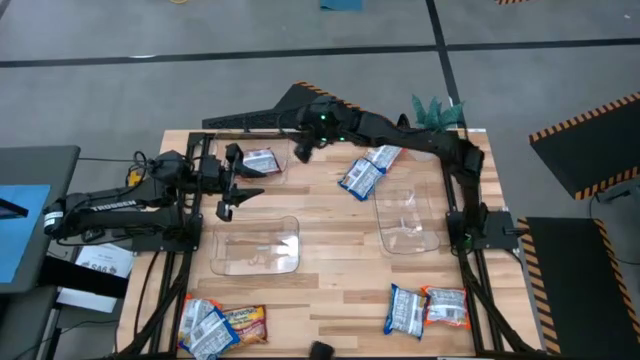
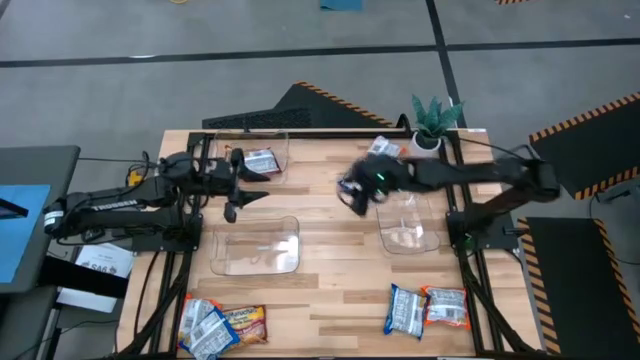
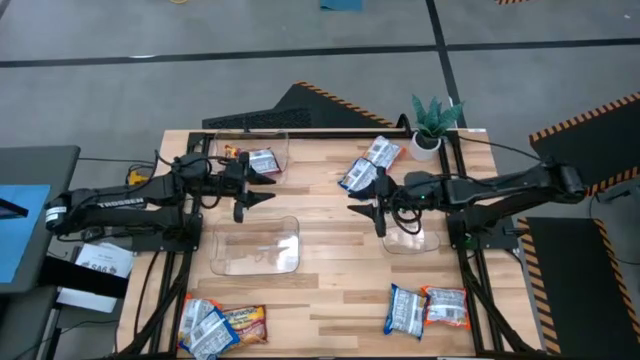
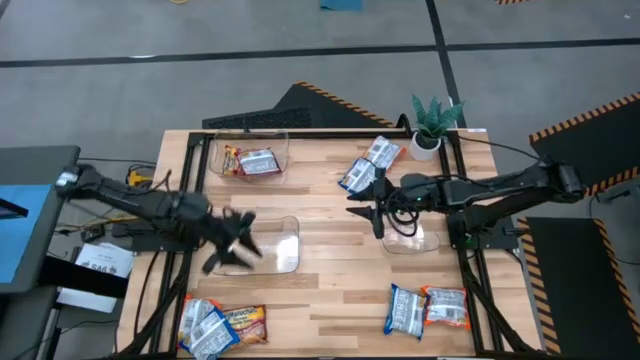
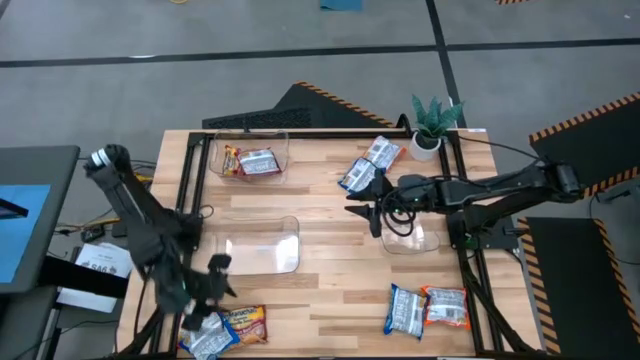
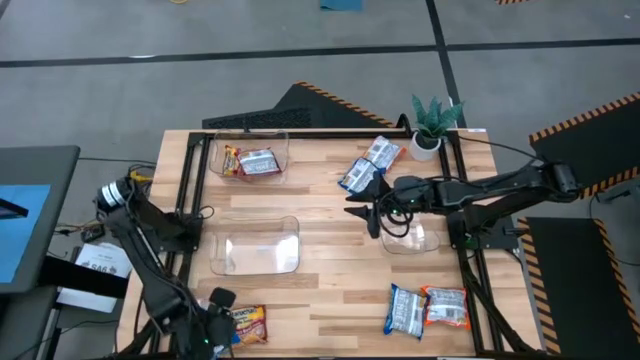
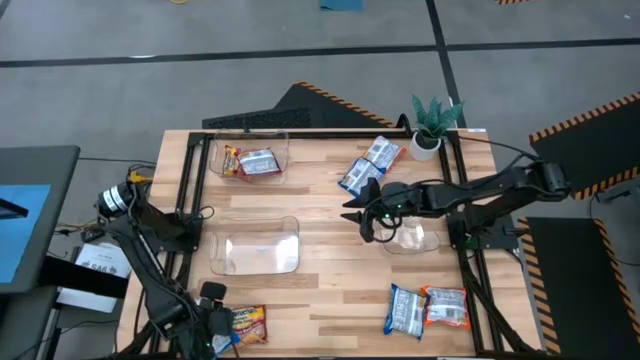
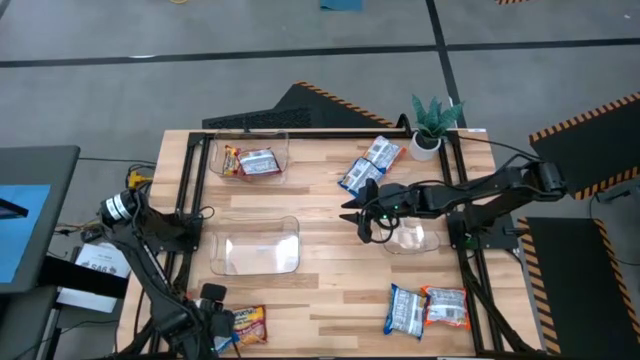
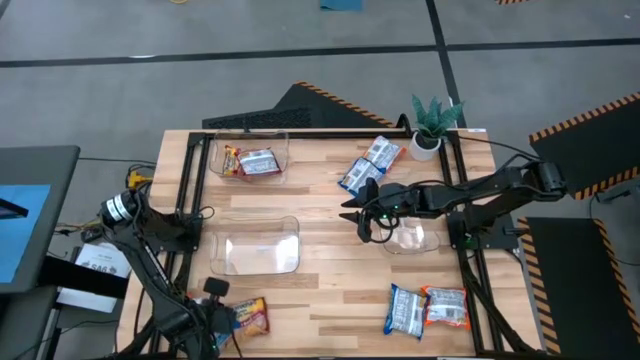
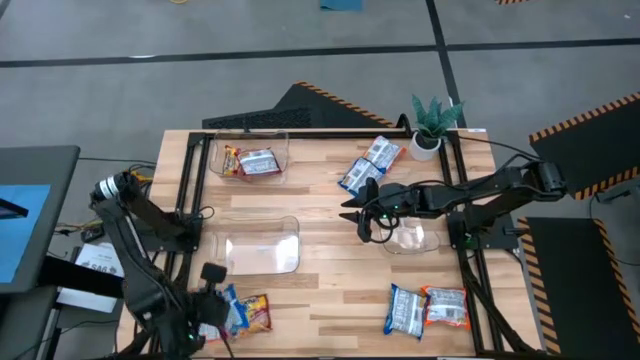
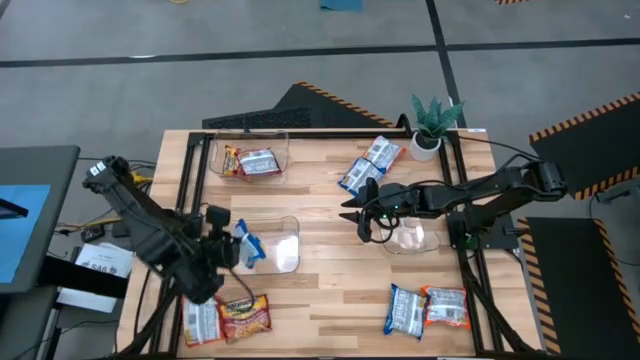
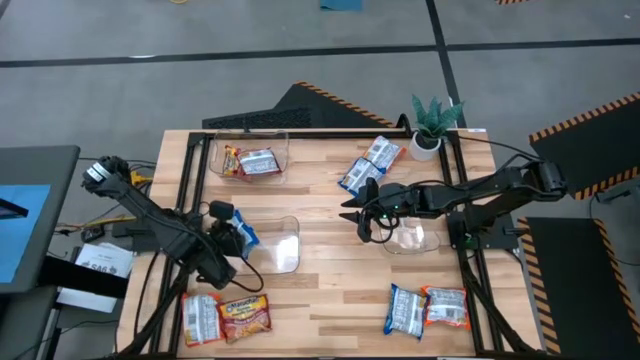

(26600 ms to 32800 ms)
Task: Sort Maruchan noodles
Put the bottom left blue noodle pack into the bottom left transparent bin

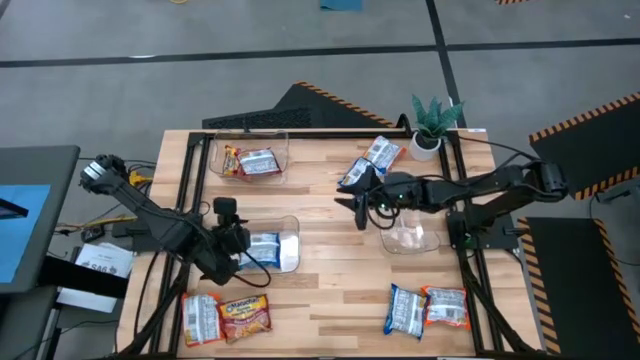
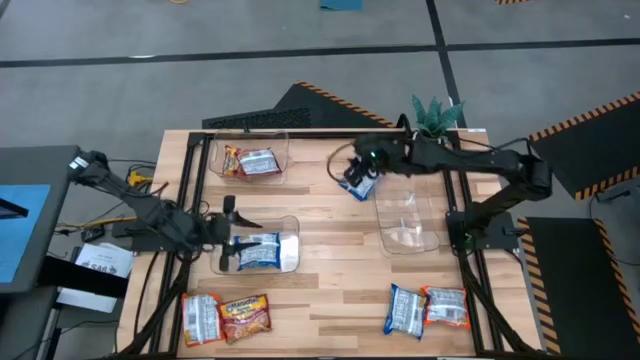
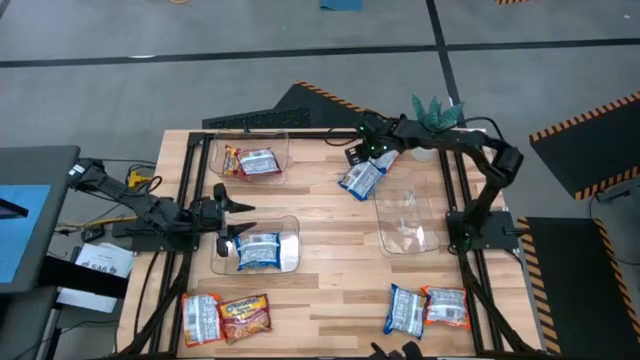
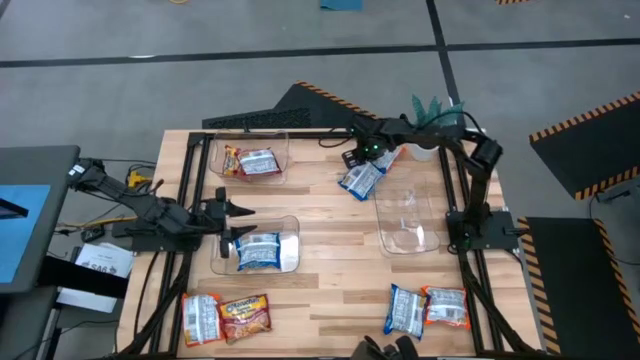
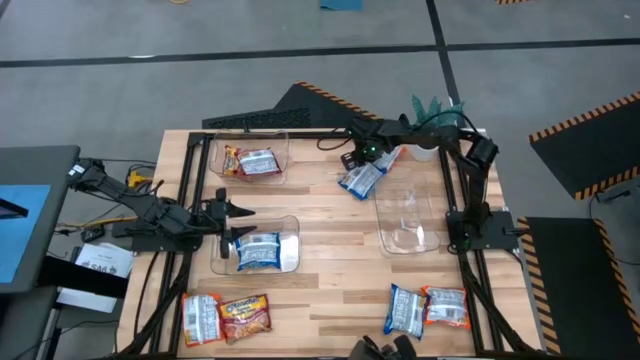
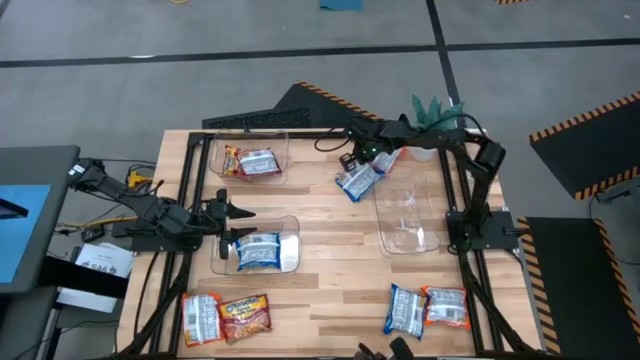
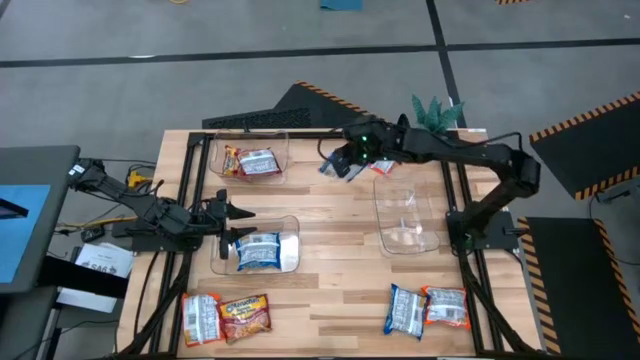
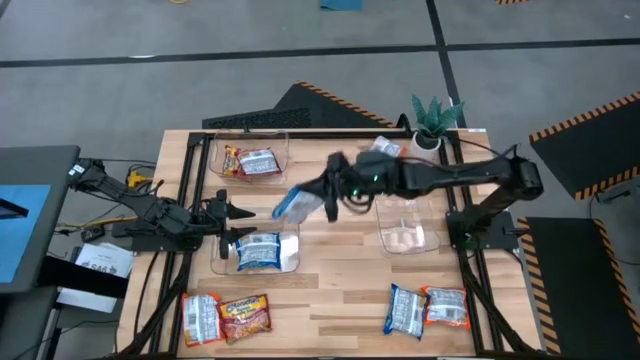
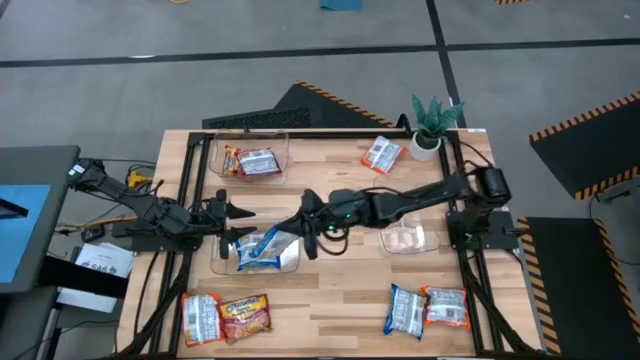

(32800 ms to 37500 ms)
Put the top blue noodle pack into the bottom left transparent bin

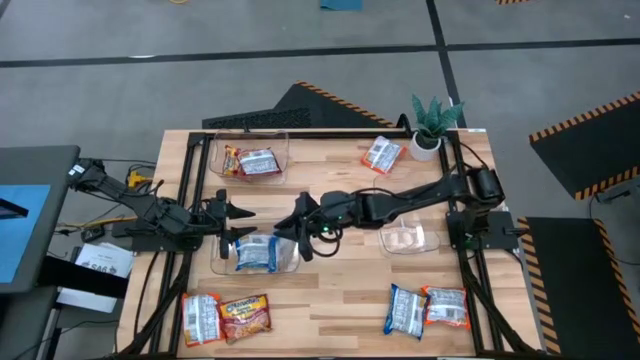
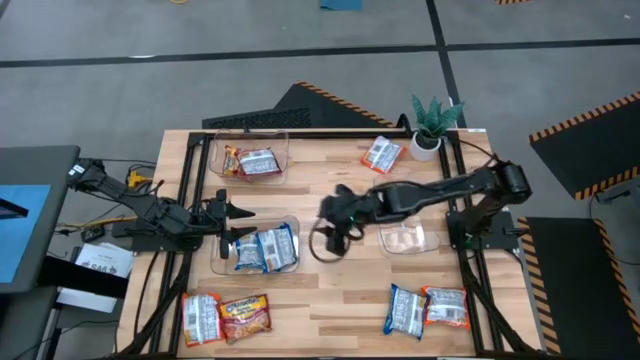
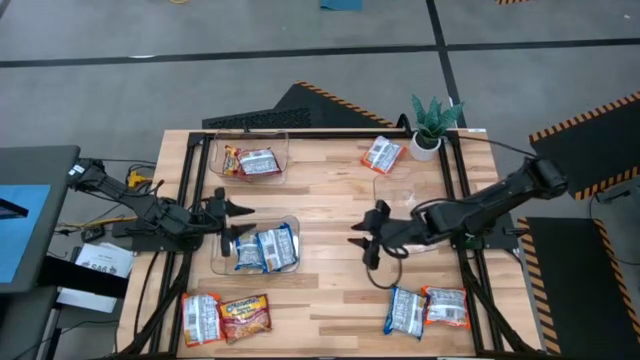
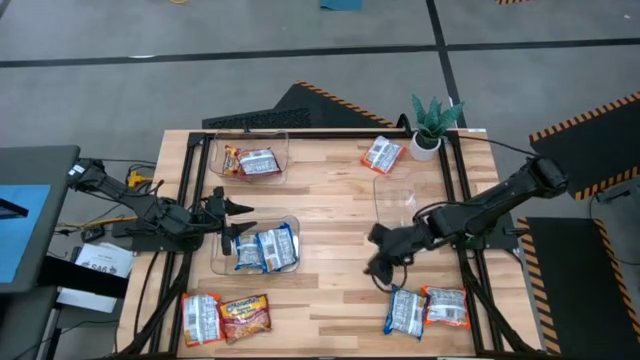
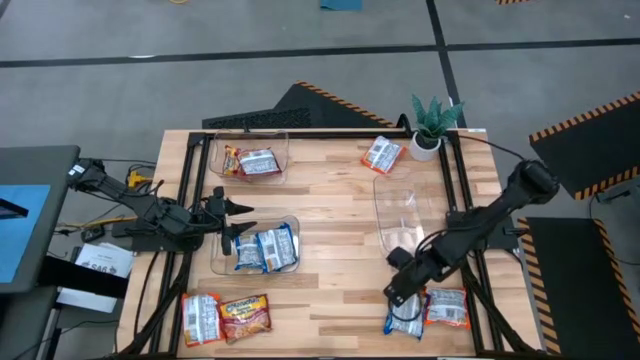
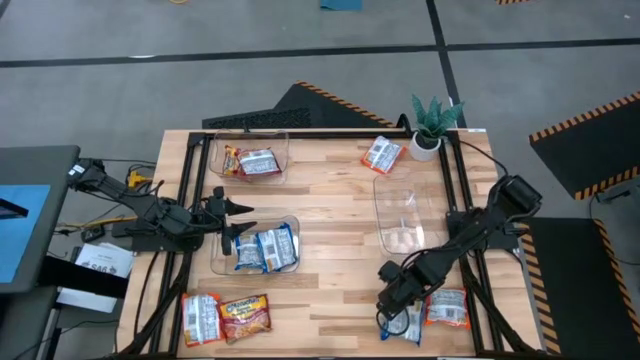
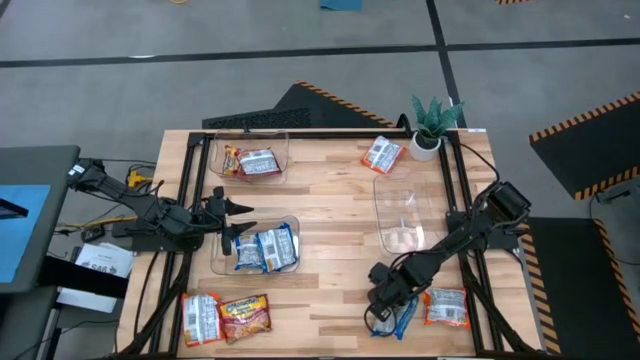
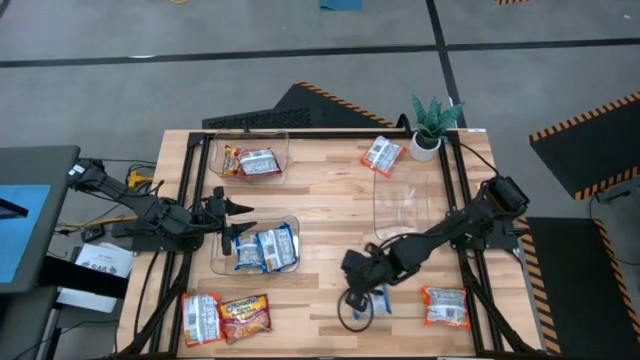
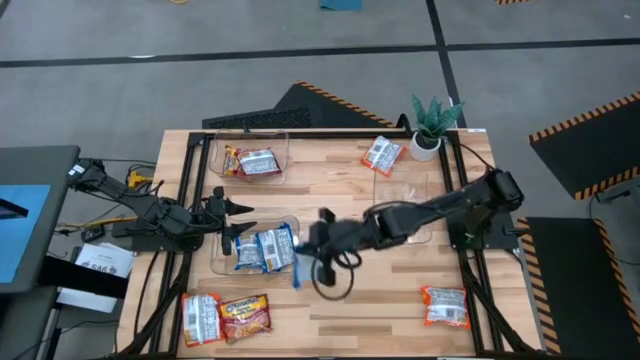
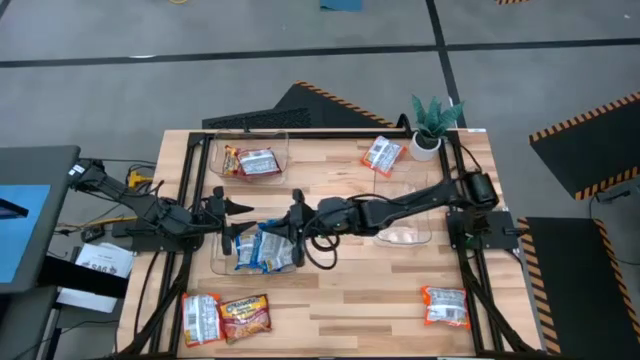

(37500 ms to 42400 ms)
Put the blue noodle pack into the bottom left transparent bin

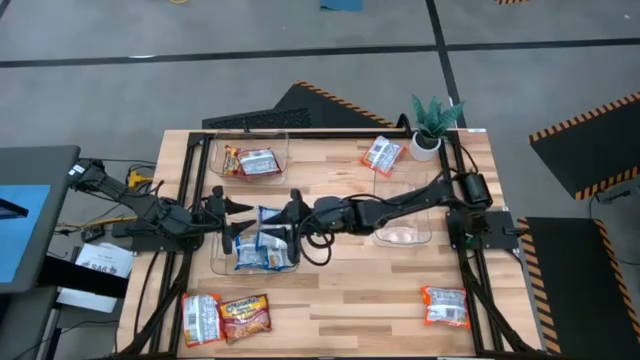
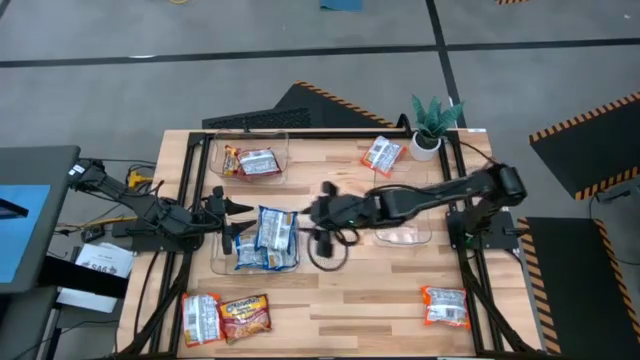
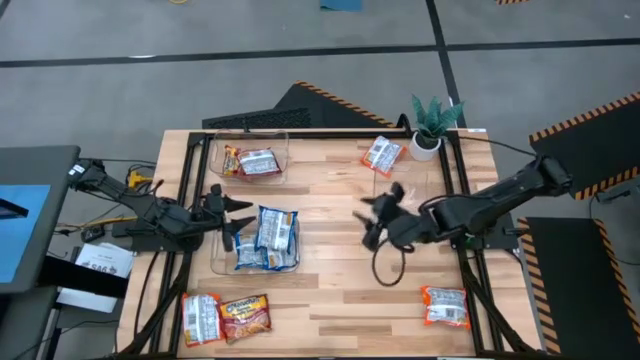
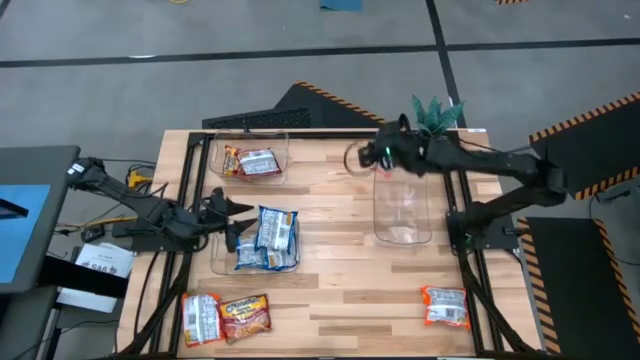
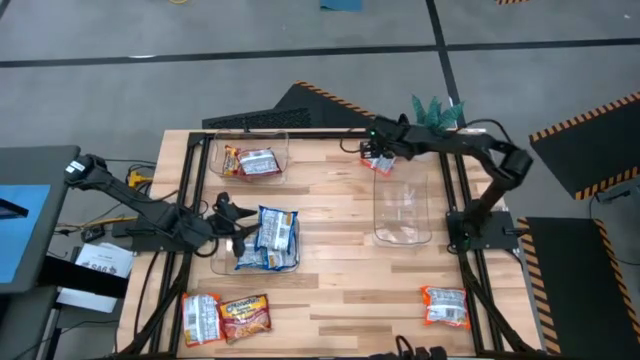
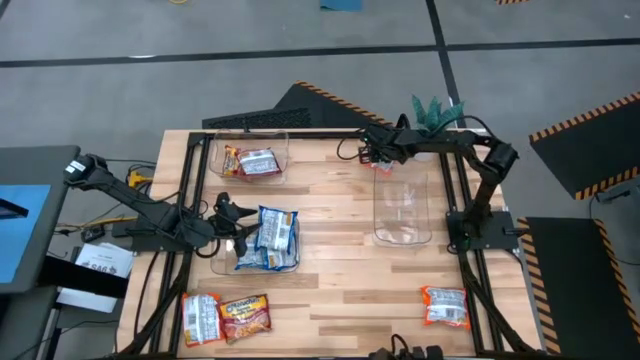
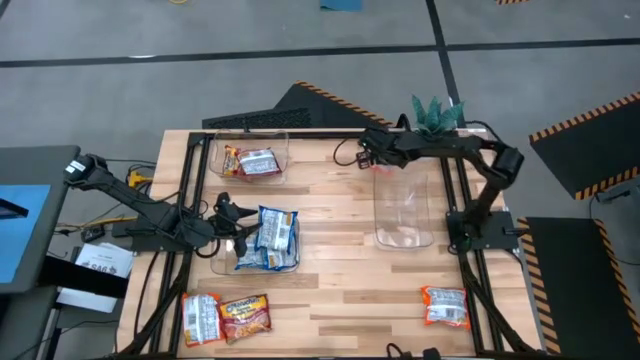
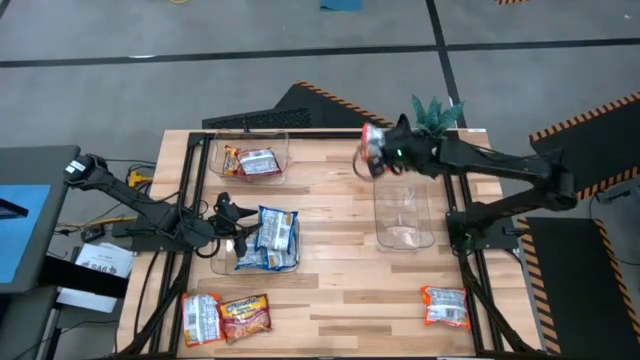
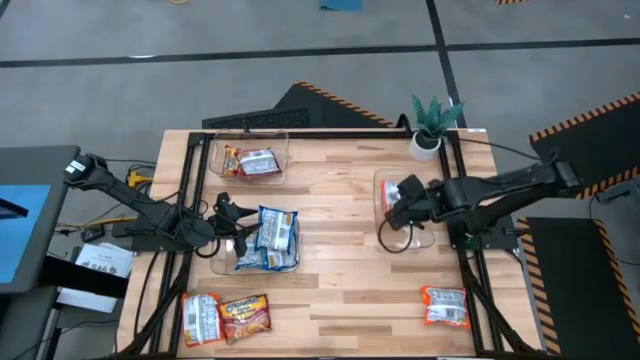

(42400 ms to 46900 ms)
Put the top orange noodle pack into the bottom right transparent bin

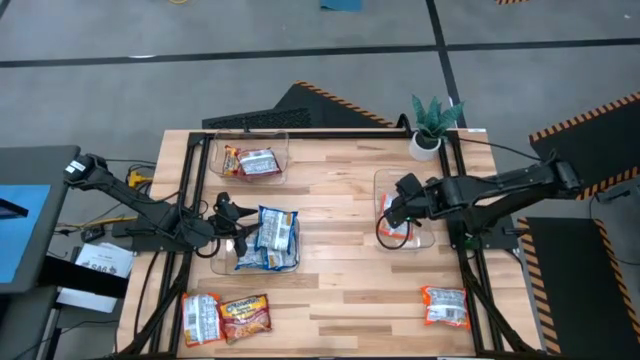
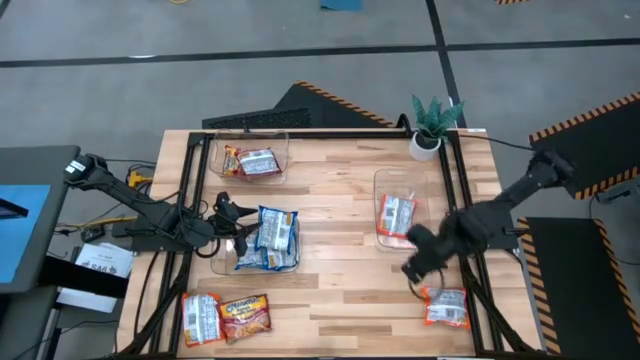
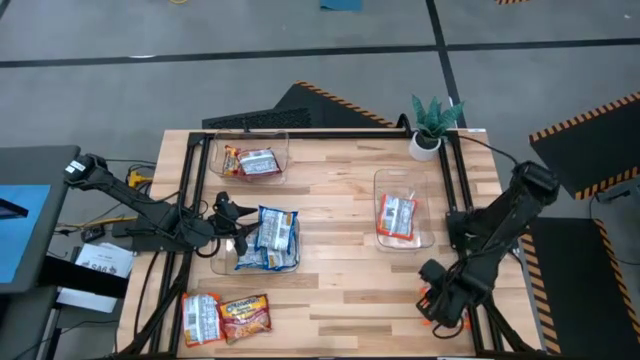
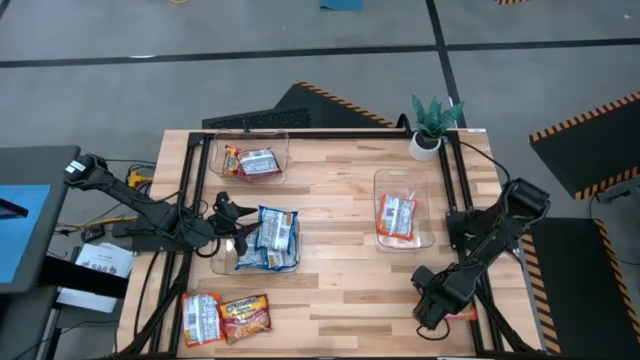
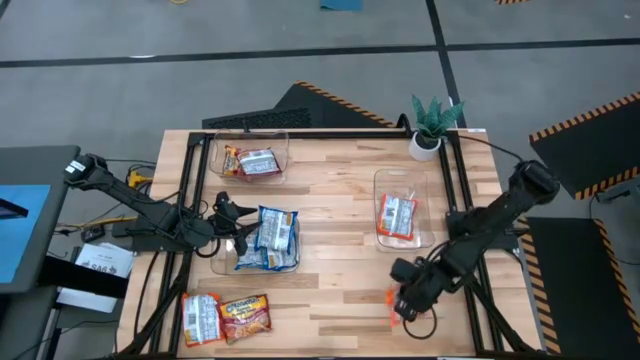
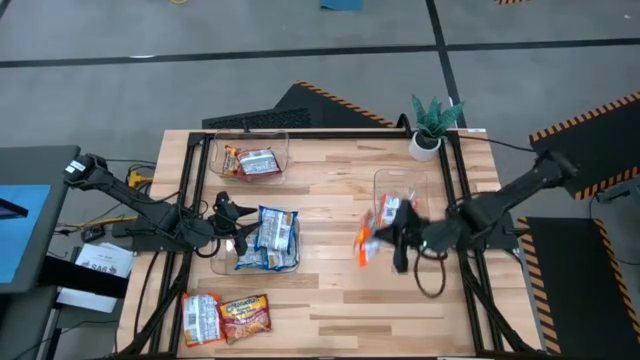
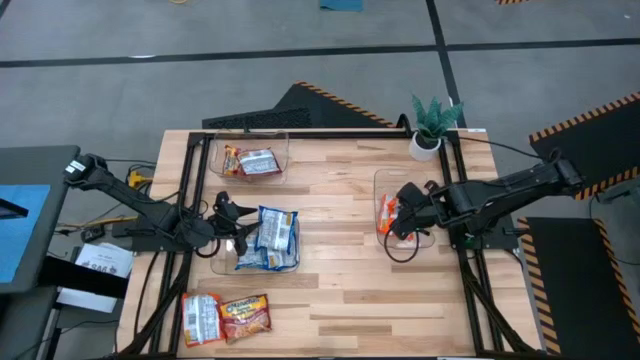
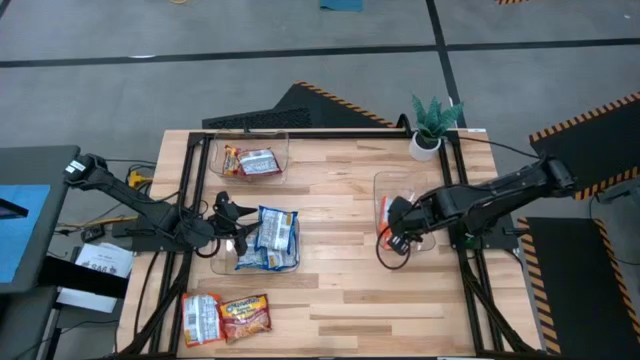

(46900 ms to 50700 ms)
Put the right orange noodle pack into the bottom right transparent bin
